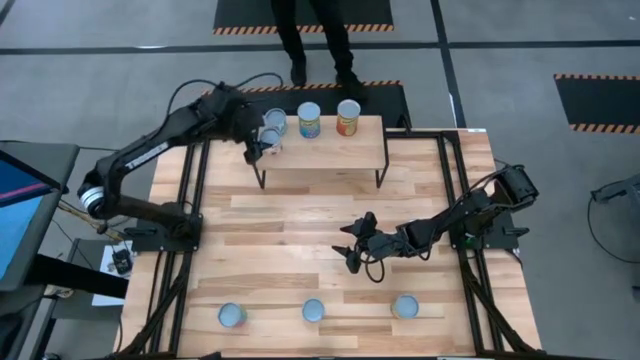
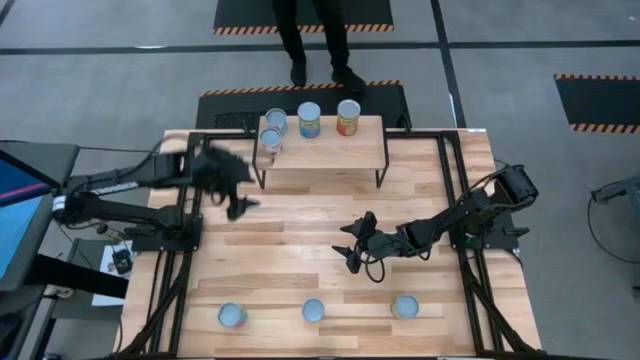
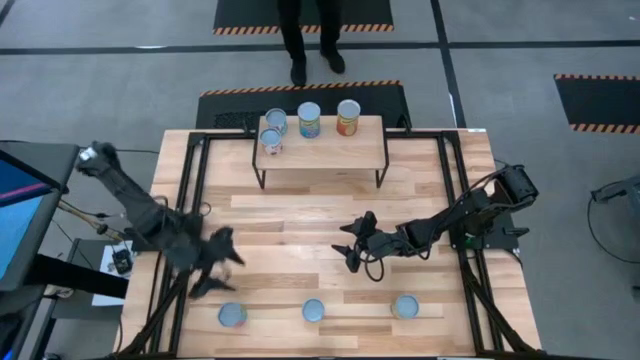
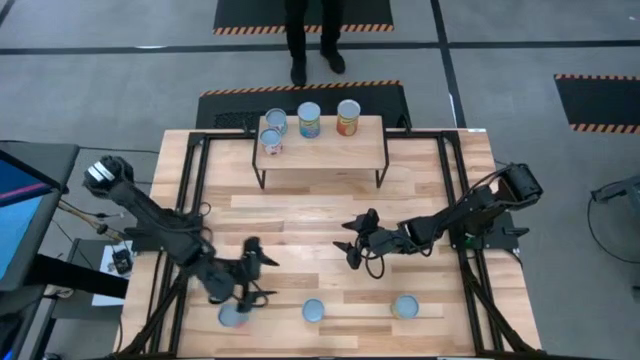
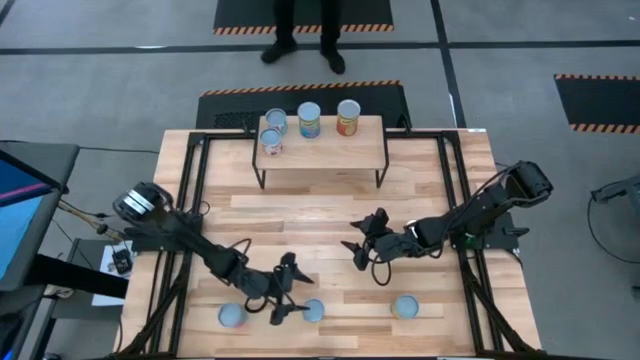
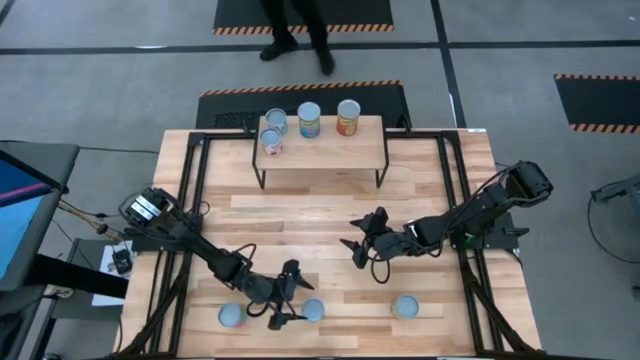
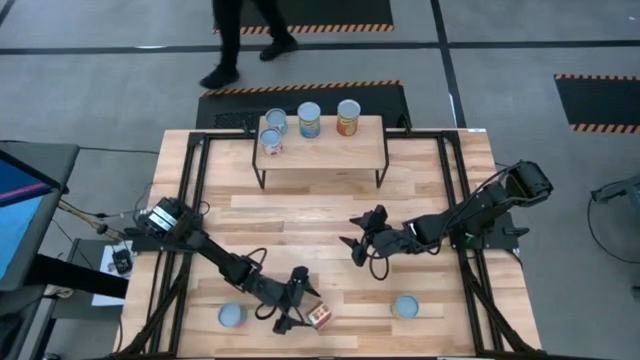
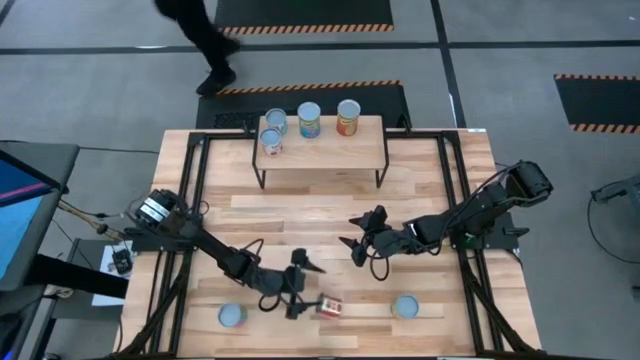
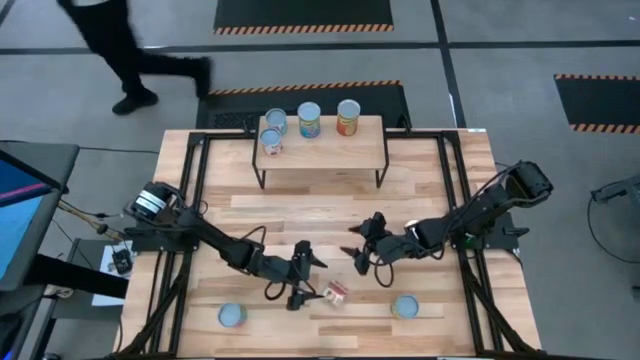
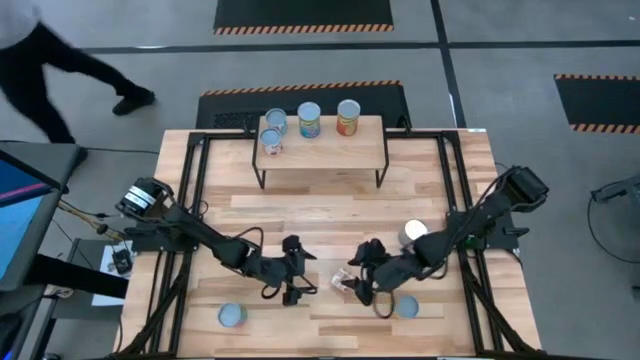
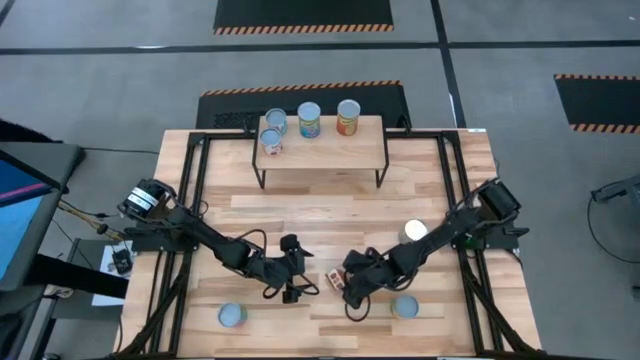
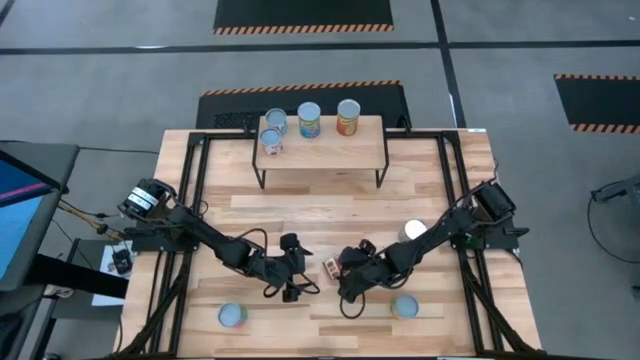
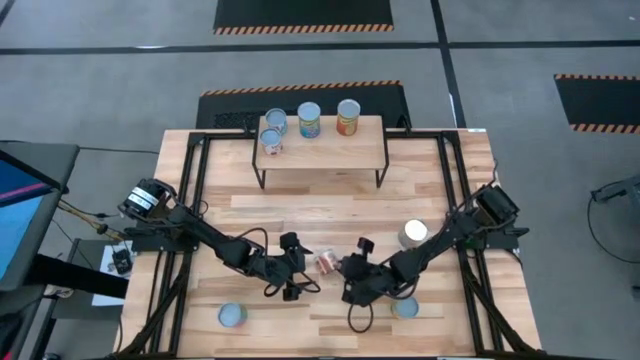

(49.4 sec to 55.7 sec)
Task: Pick and place cans onto a shelf
Put the canned diced tomatoes on the shelf

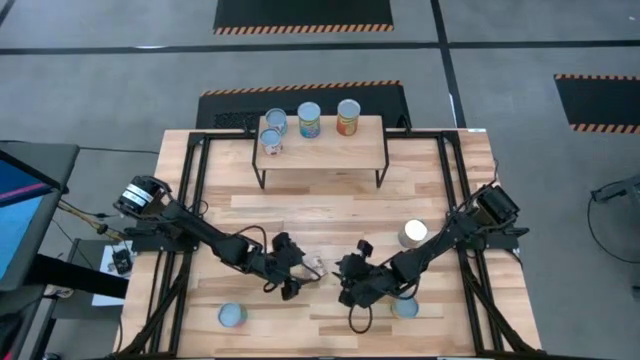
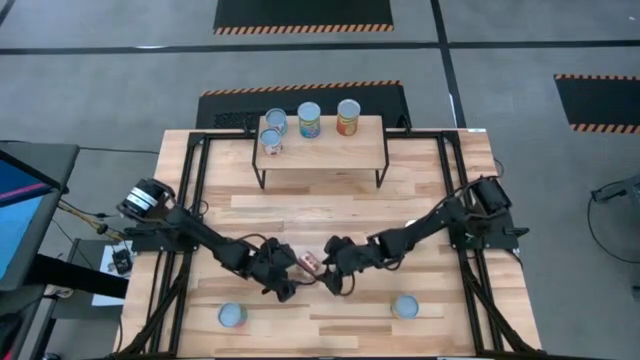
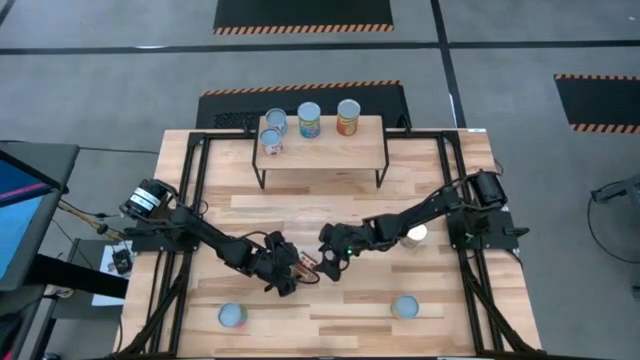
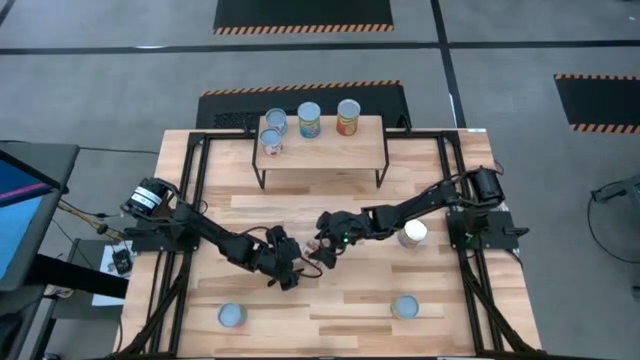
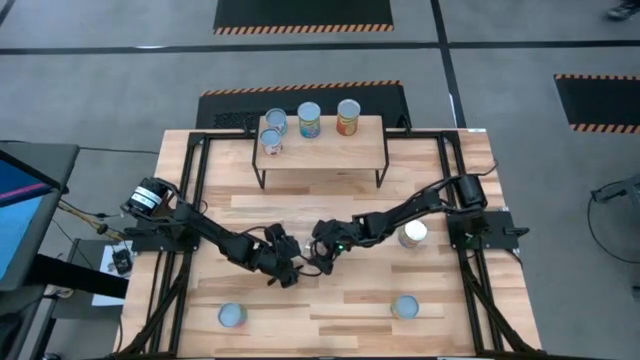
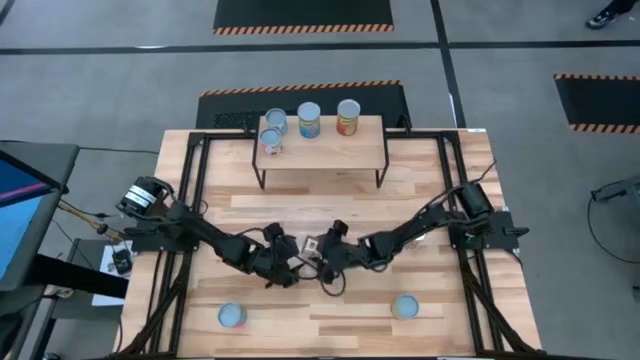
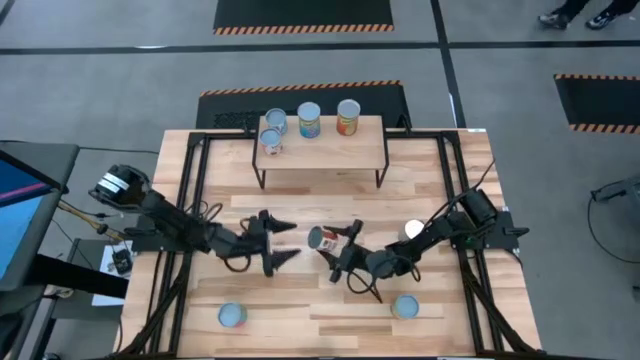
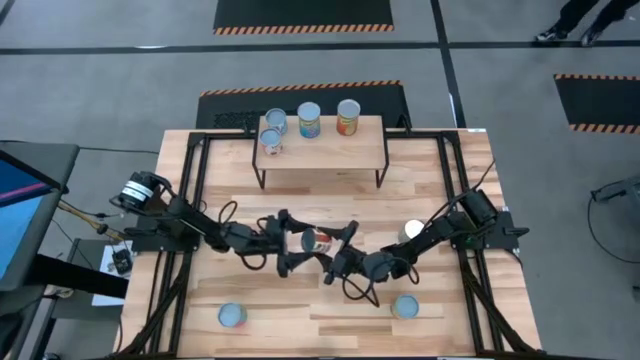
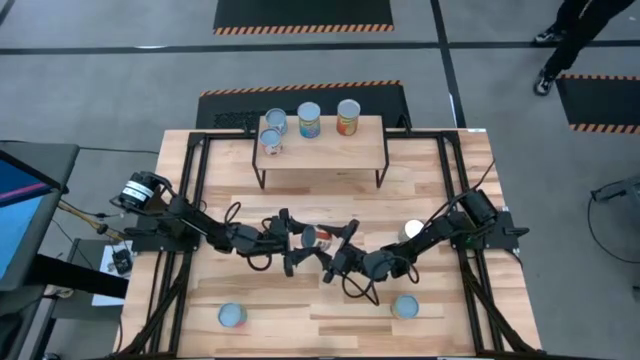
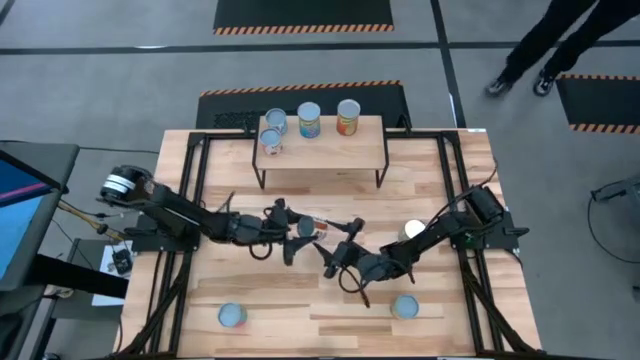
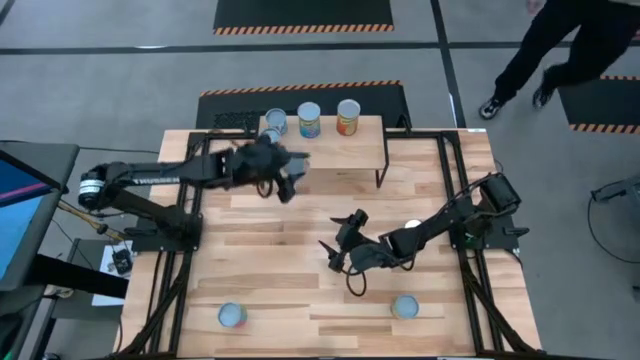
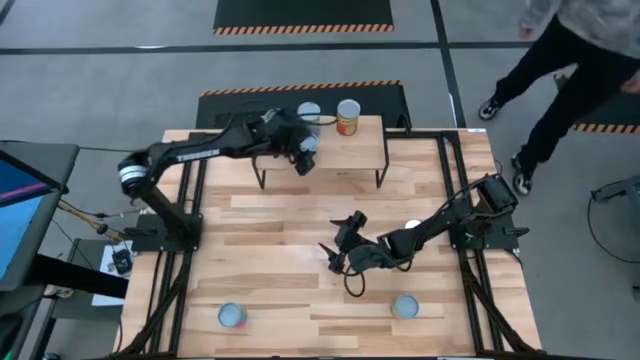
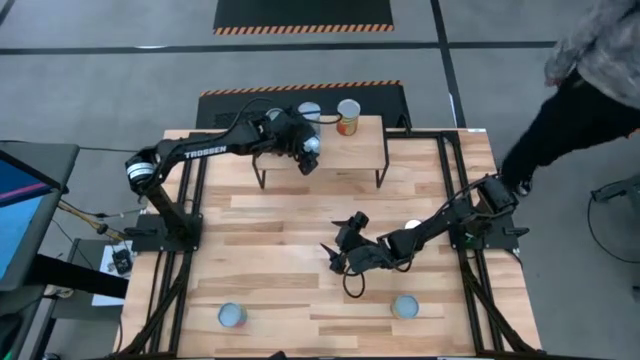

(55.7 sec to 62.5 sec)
Put the canned diced tomatoes on the shelf

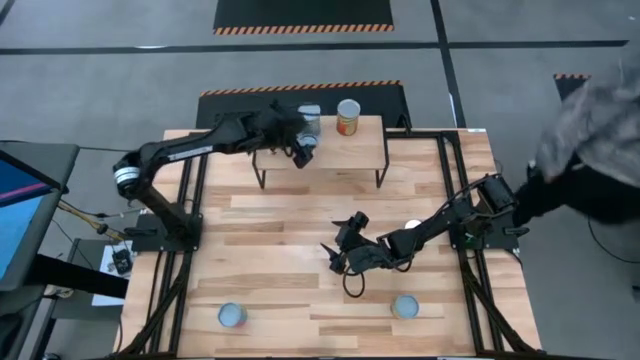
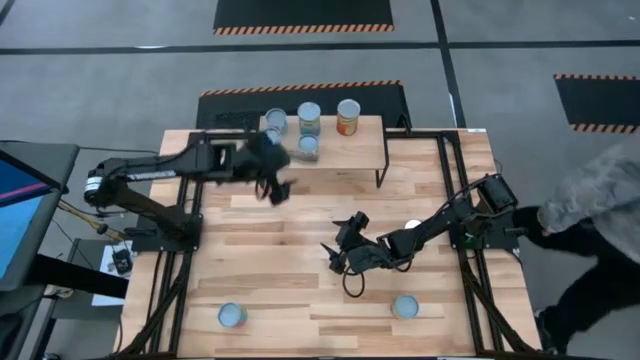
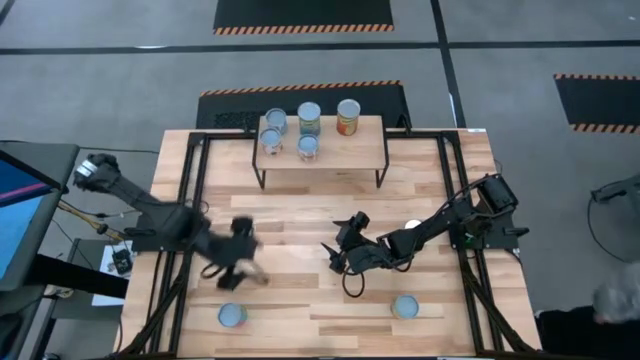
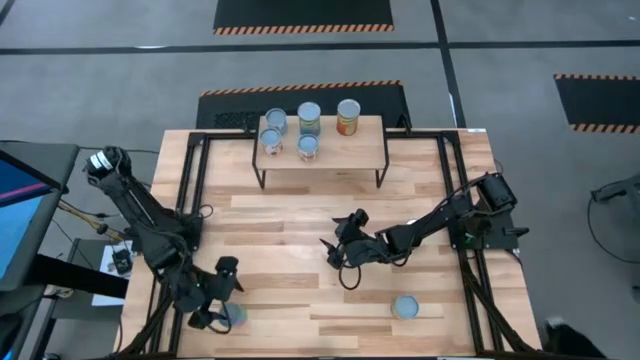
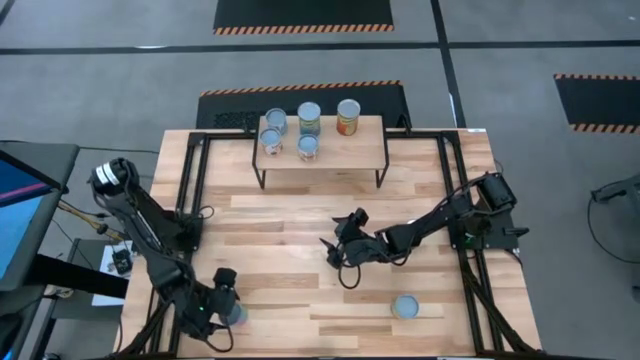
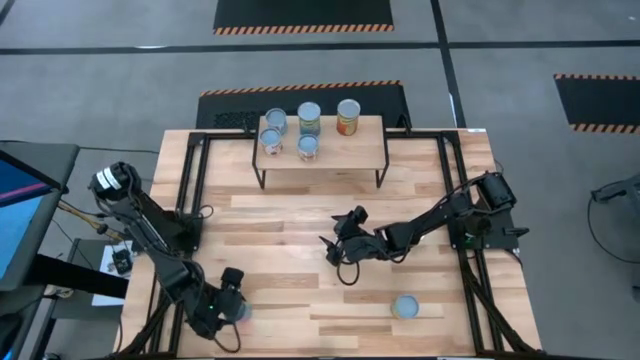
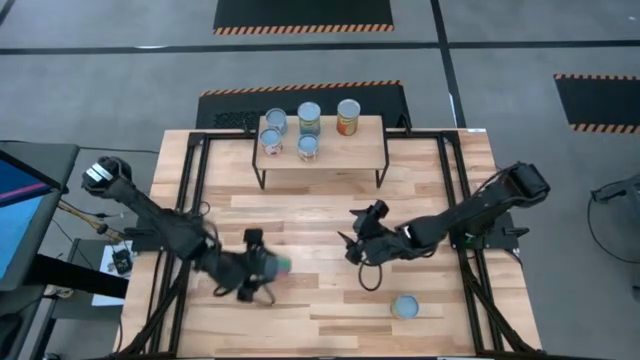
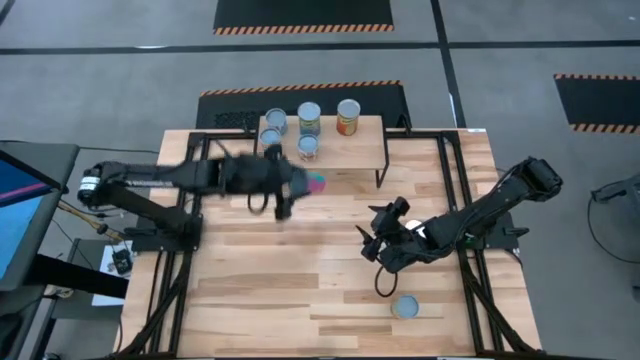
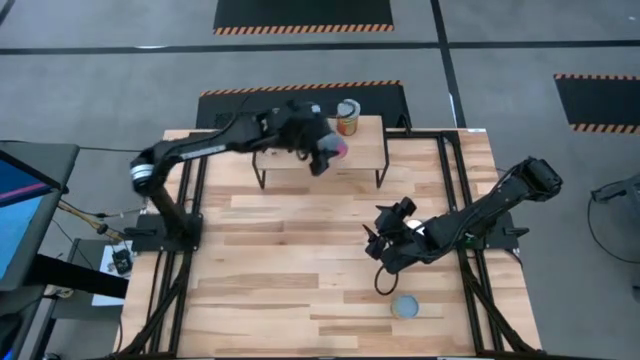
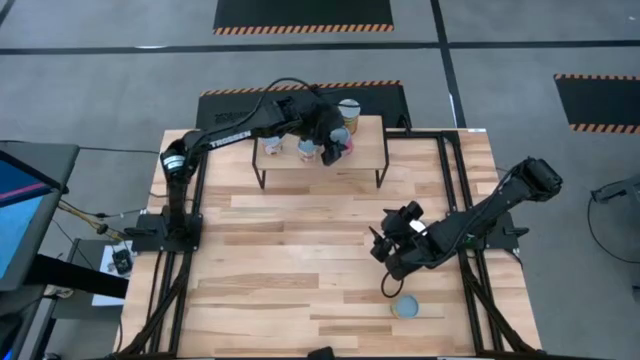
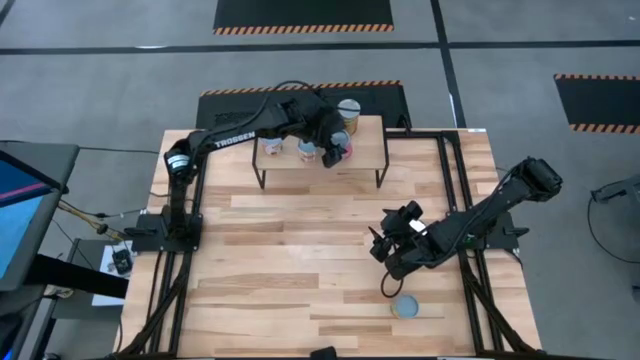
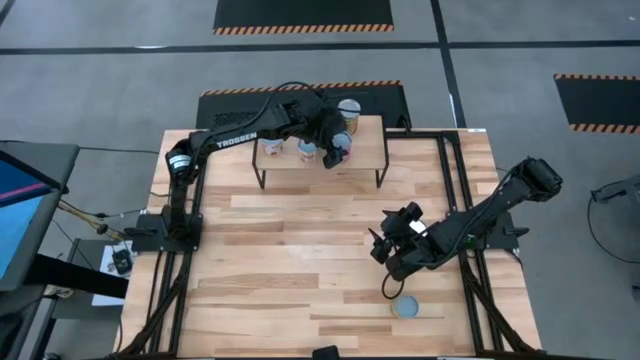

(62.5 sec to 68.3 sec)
Put the canned chicken soup on the shelf

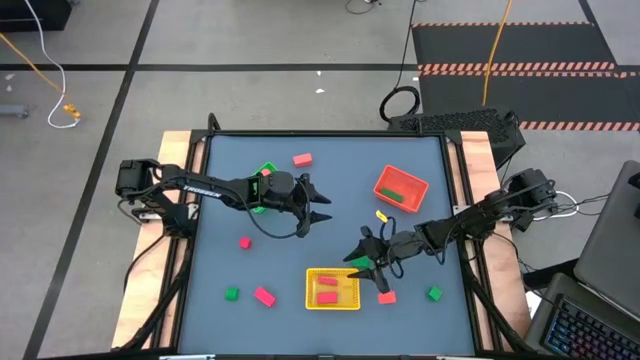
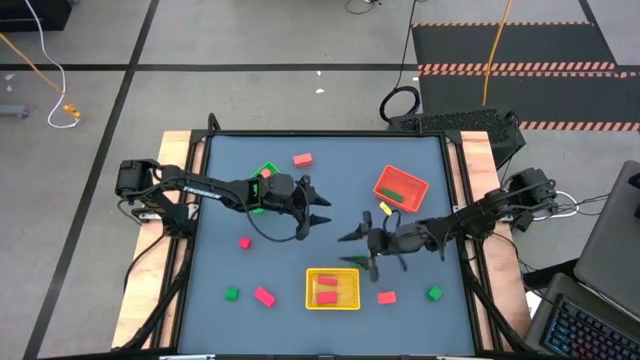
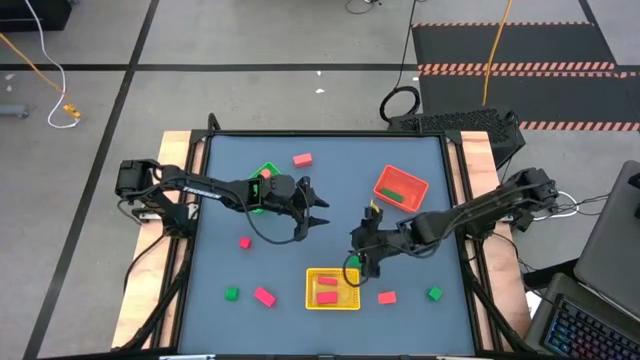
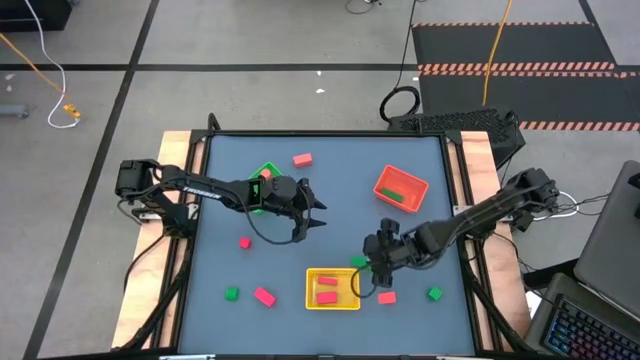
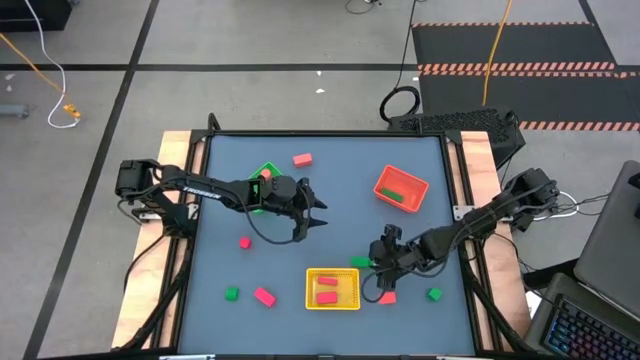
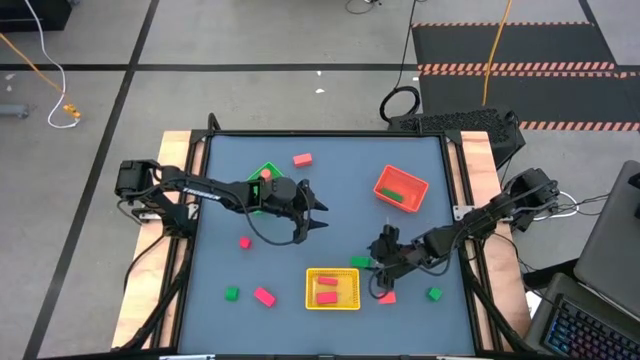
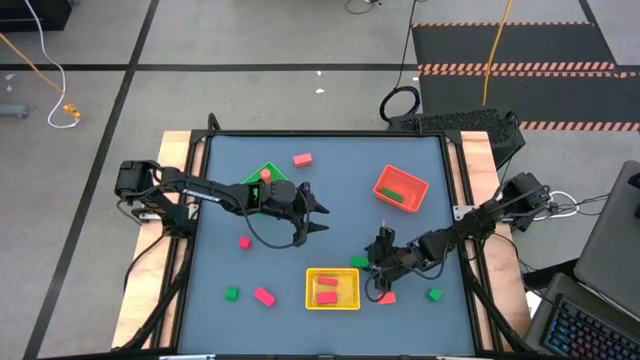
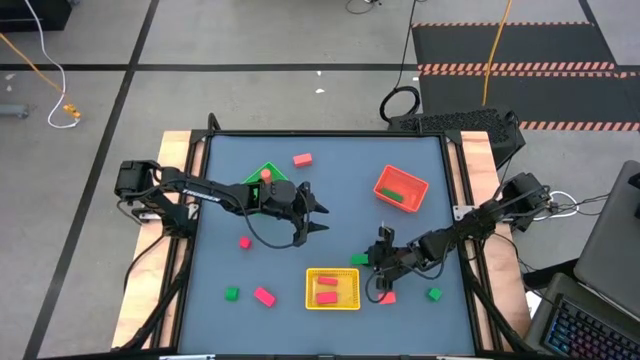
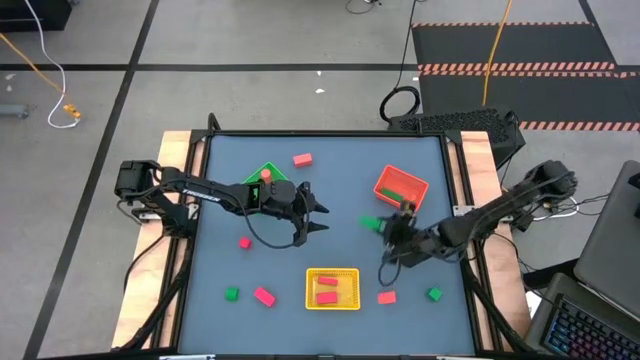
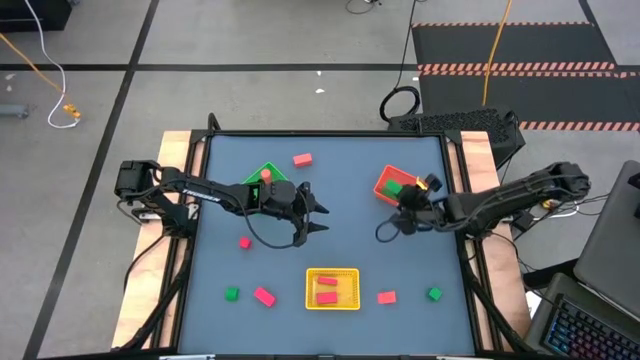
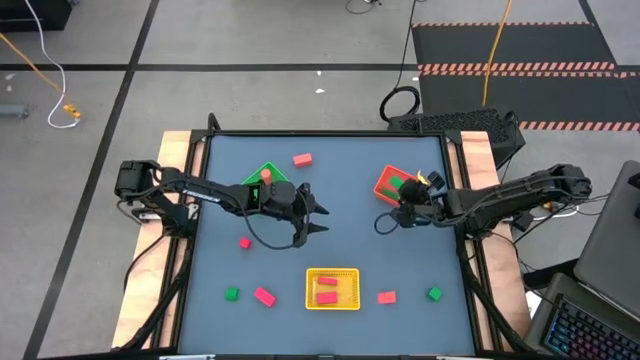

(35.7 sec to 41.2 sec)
Task: Sort & place blocks by color
Put the green block into the orange bin
